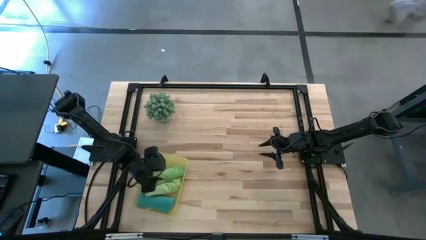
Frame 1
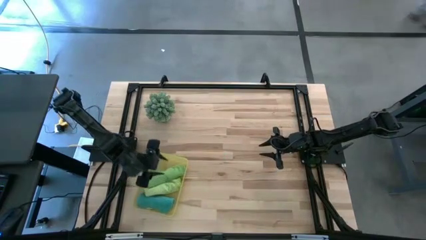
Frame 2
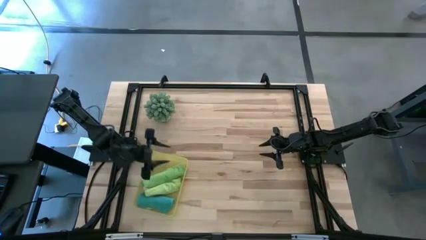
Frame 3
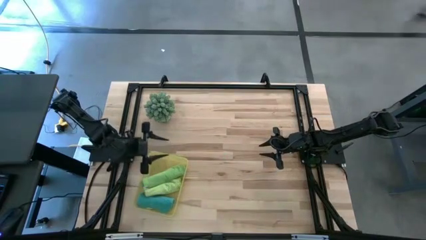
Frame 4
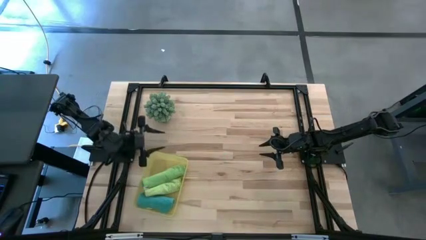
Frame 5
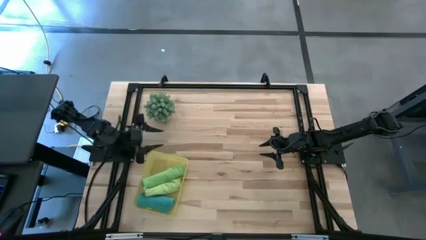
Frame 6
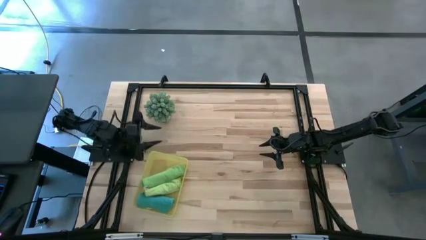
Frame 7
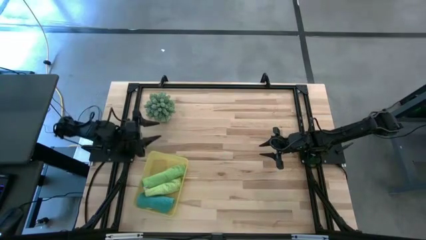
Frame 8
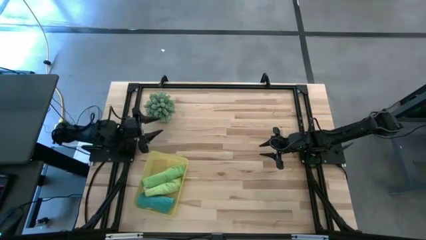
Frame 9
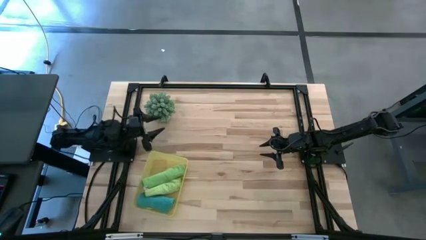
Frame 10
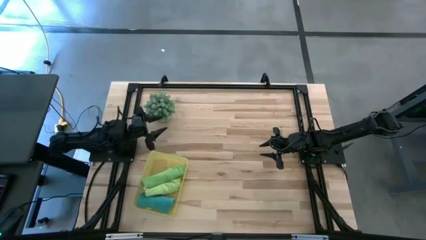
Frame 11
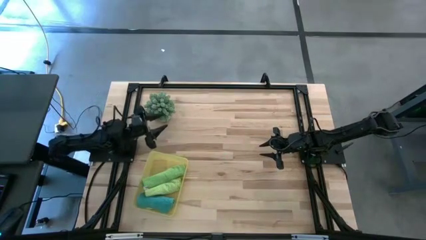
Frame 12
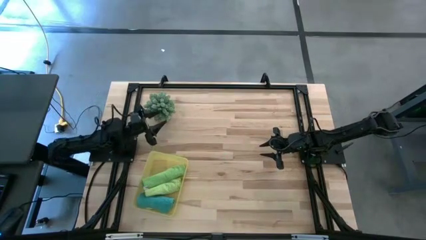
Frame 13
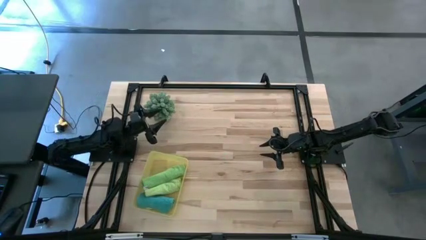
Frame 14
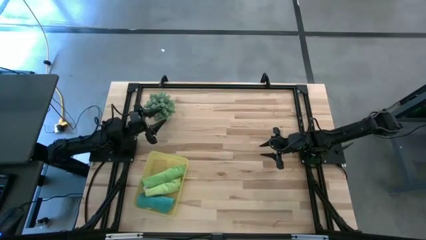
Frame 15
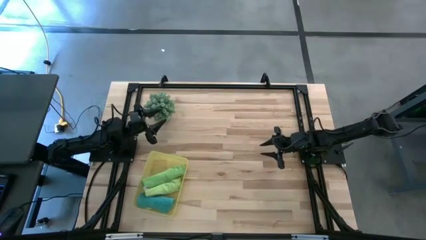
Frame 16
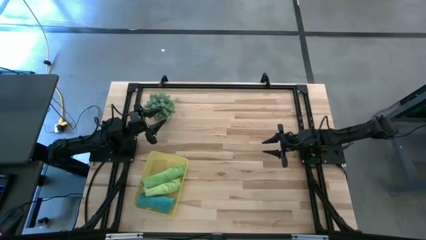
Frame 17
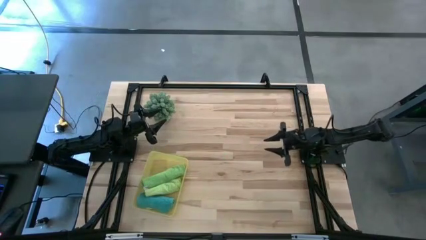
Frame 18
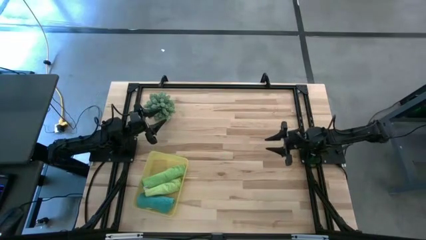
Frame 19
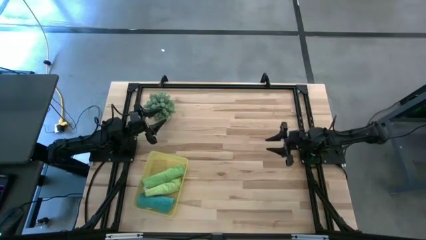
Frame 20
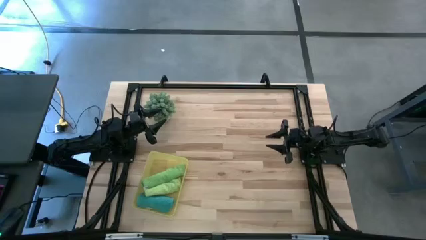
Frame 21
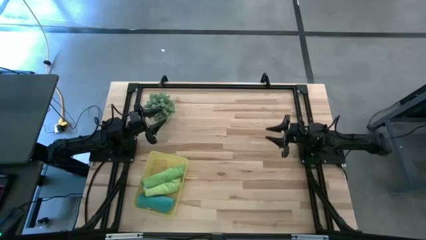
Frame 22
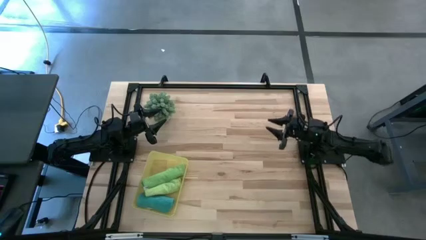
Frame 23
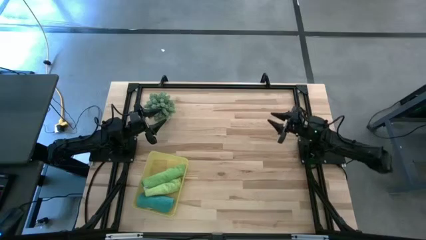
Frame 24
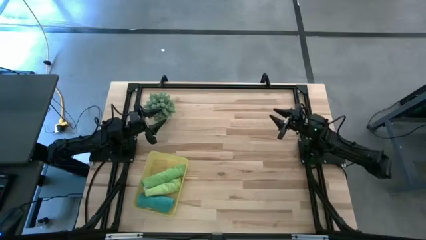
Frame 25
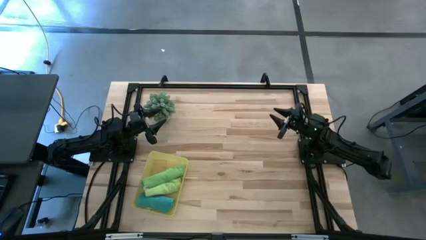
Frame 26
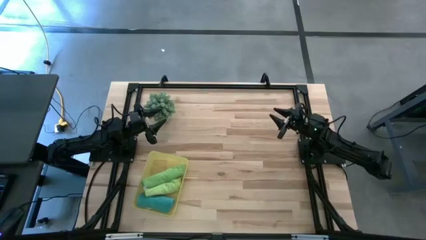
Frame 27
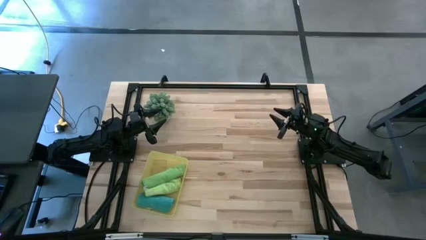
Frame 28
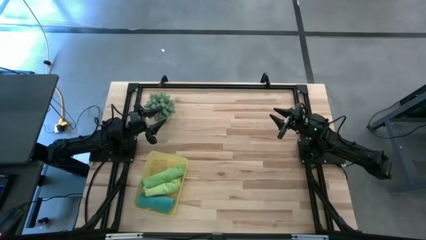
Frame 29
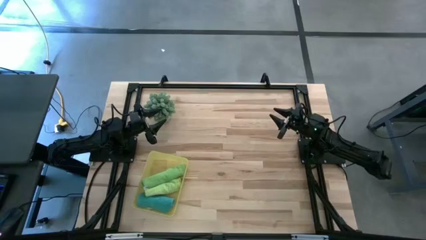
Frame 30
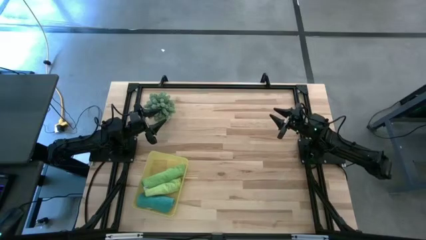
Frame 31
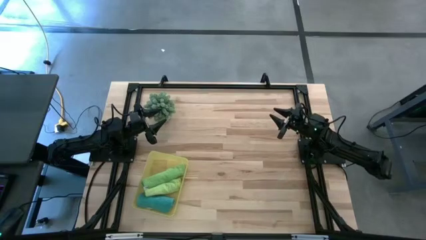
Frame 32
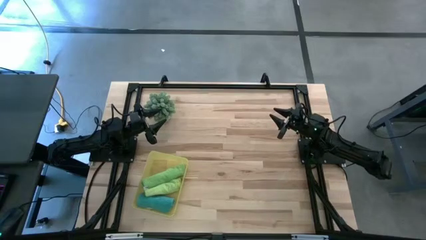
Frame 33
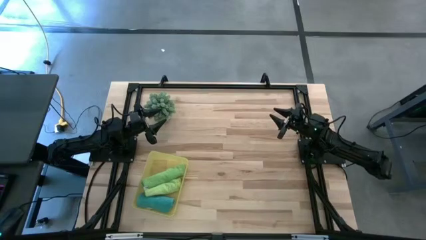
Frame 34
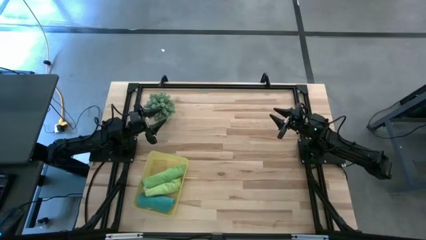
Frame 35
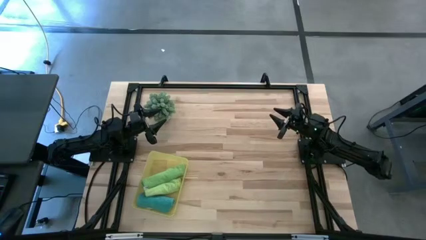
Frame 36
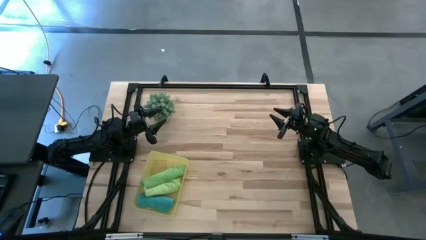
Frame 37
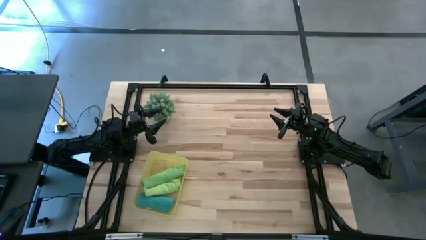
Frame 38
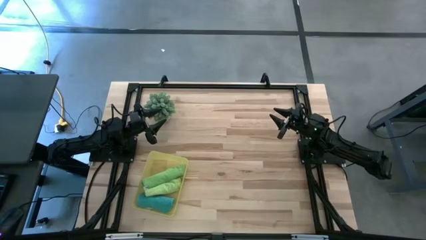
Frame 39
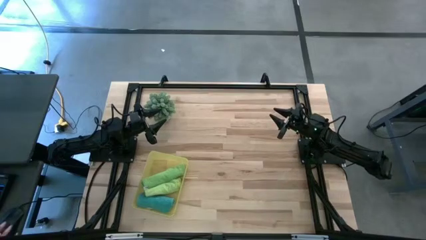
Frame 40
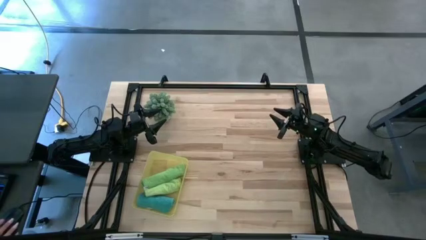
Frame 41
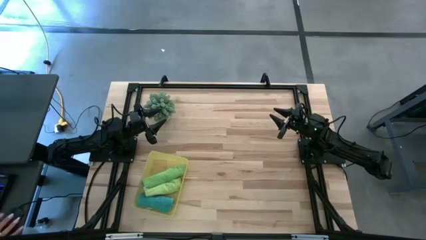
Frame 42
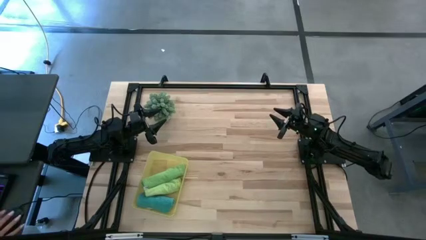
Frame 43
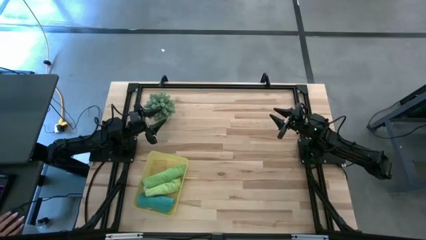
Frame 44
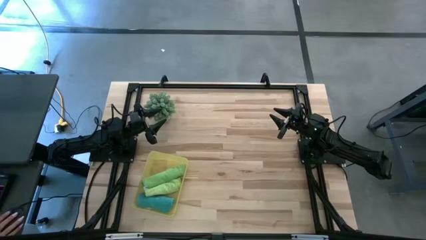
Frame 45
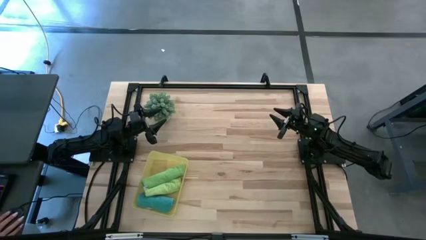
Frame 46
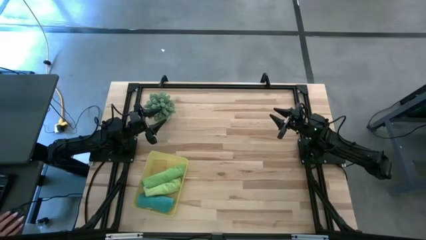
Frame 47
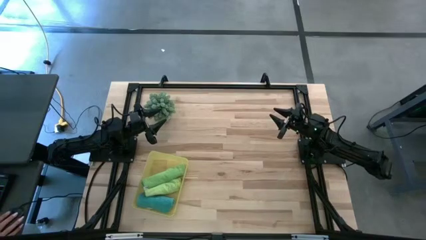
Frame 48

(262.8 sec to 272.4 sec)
Task: Roll microfiber towels into tight, uniform cylinder then place into a basket
Return to Home Position

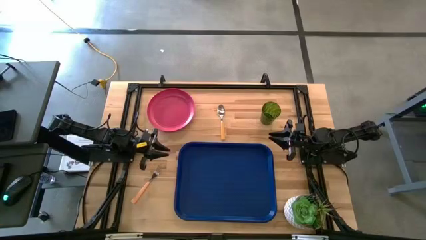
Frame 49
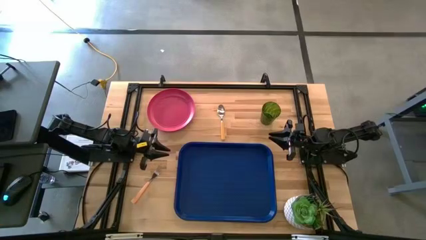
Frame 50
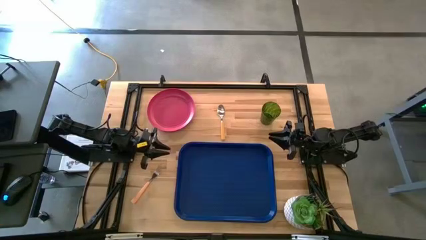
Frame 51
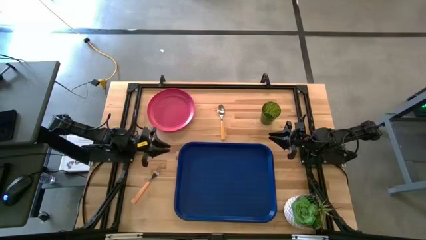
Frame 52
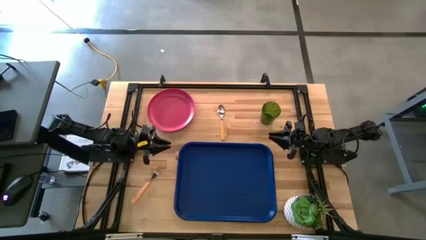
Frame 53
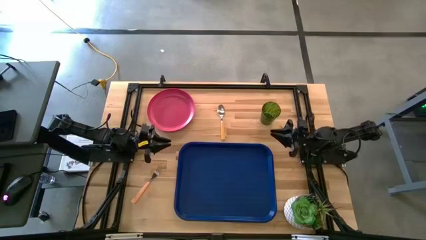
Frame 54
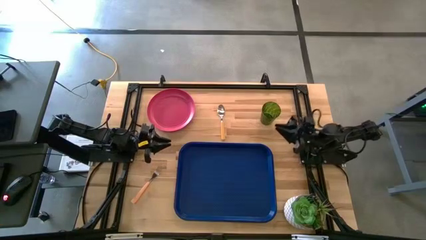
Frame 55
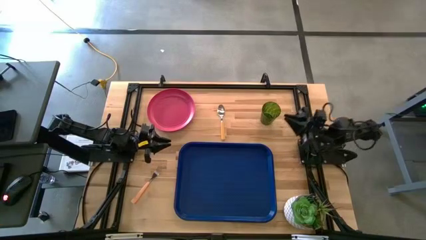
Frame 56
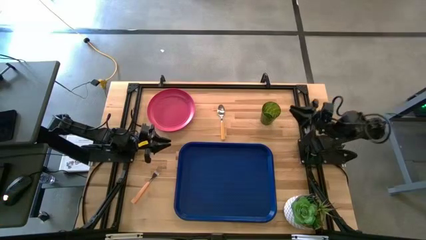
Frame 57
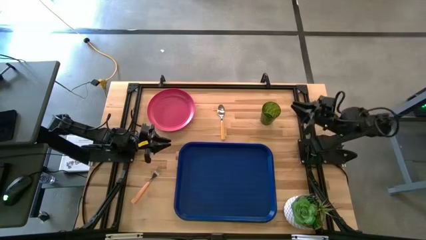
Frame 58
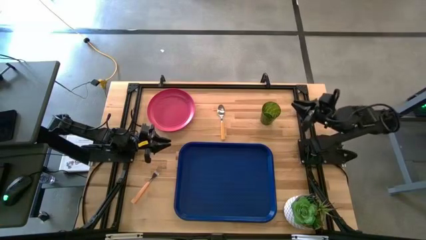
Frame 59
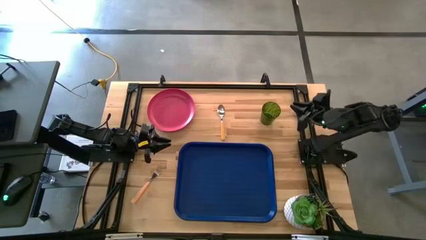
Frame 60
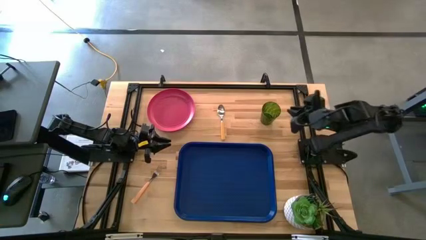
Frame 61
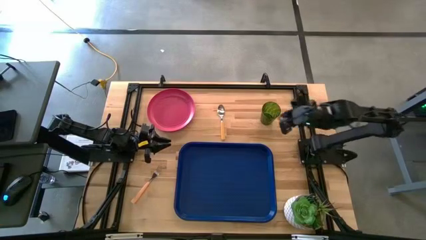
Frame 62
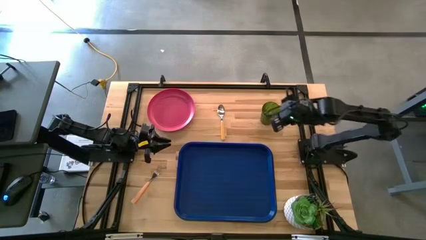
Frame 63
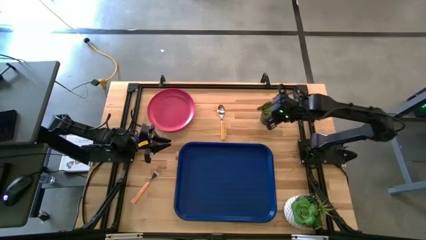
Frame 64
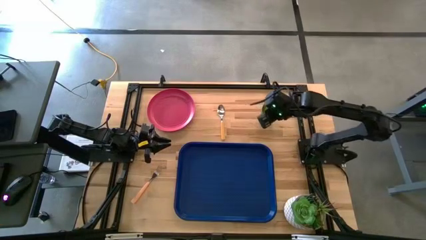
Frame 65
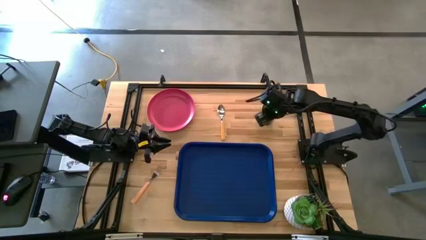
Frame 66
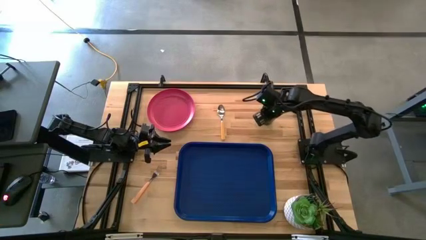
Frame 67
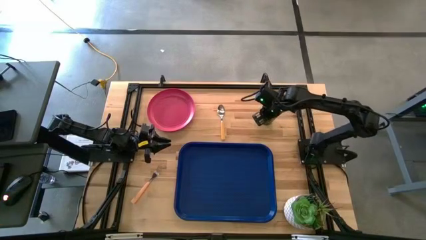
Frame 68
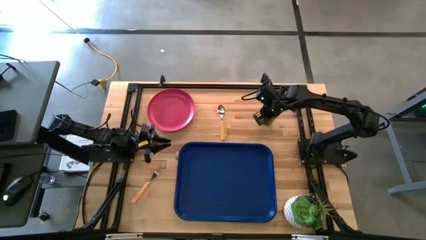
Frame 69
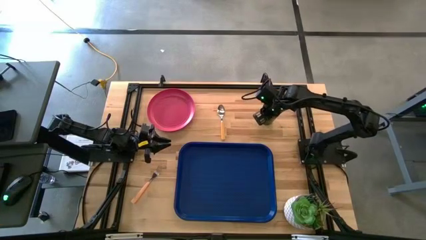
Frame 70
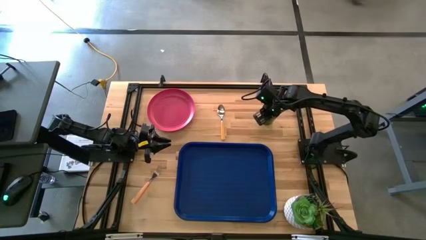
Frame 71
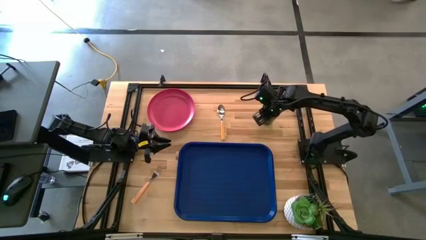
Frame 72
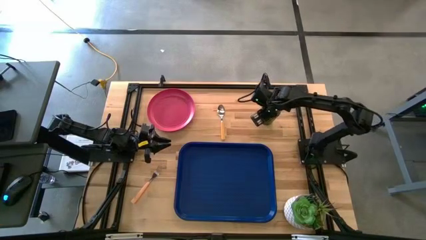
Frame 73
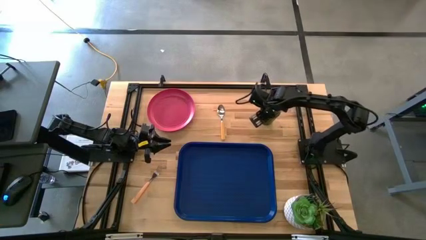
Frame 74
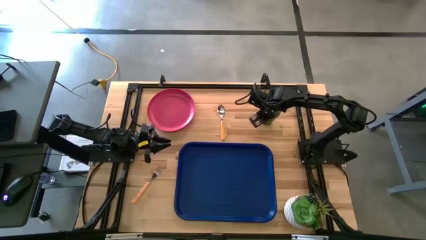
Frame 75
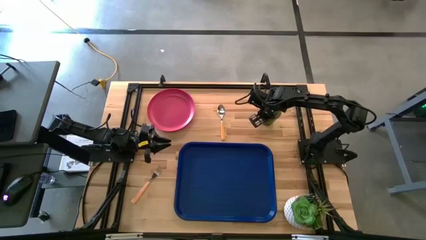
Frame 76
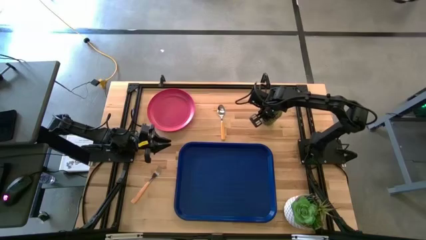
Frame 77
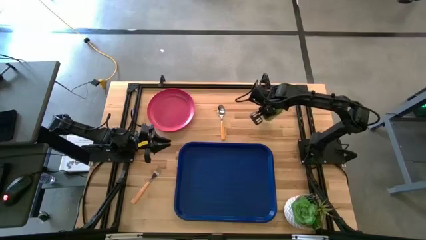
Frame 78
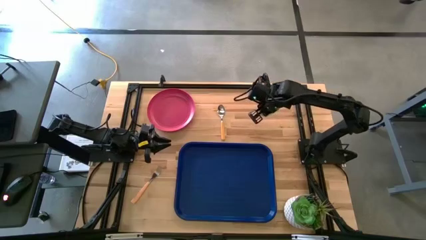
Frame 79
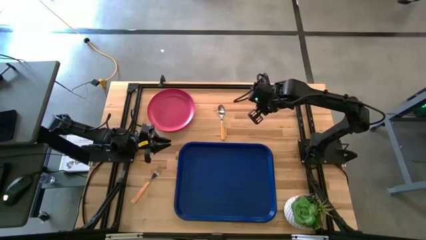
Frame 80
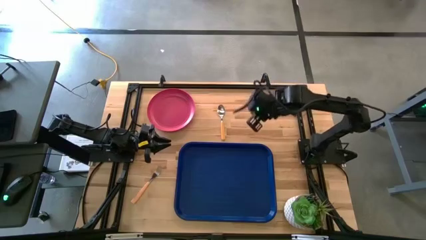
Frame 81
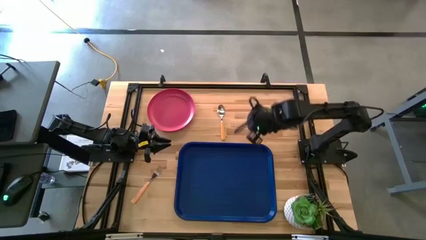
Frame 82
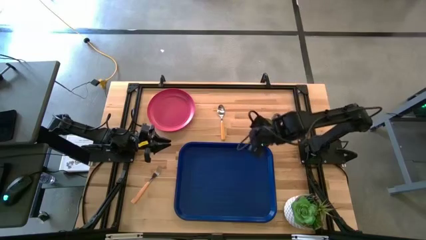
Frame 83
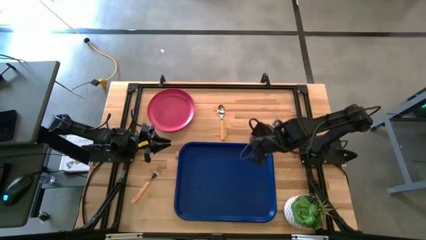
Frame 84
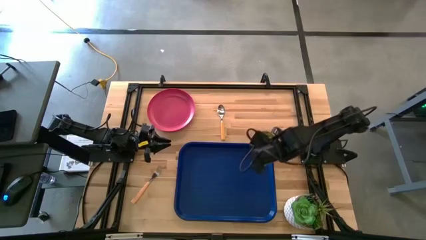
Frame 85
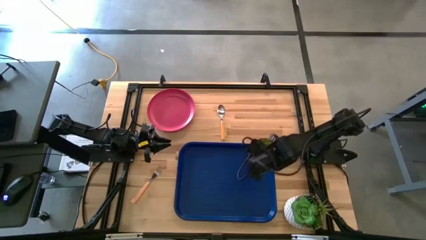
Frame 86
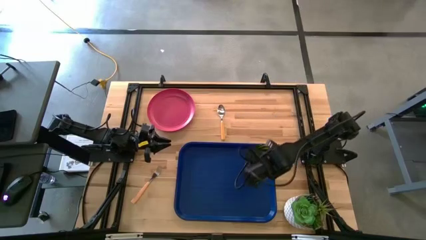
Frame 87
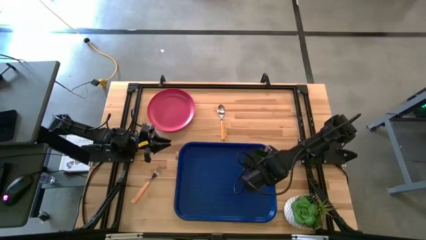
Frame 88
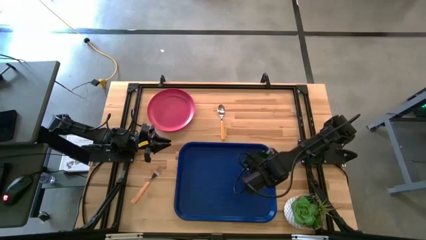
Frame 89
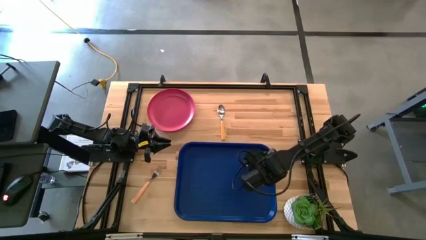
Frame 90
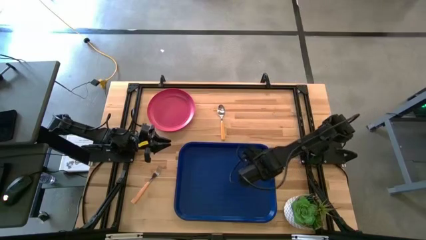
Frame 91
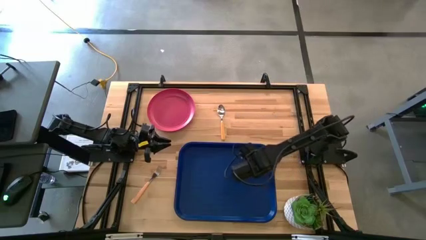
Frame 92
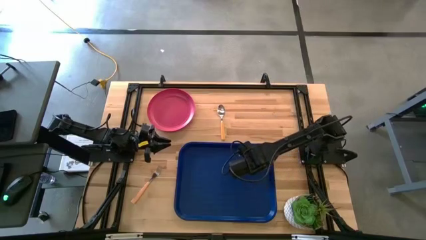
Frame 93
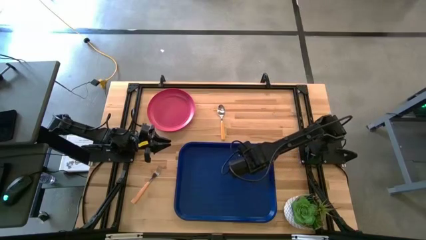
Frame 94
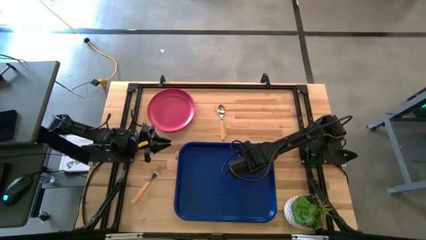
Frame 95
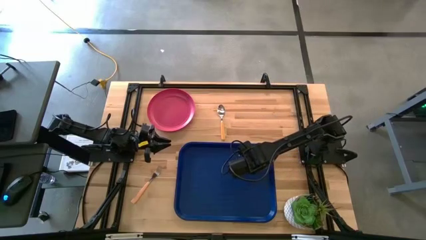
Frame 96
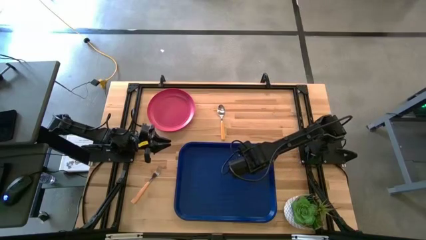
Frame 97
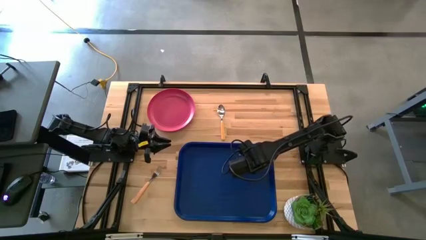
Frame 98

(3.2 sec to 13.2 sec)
Task: Pick and place plate/cup/fork/spoon on tray
Put the green cup on the blue tray
